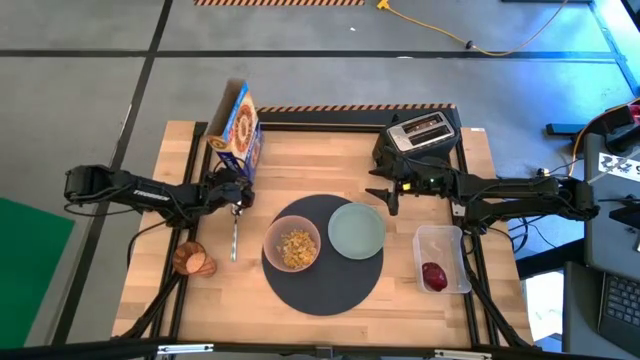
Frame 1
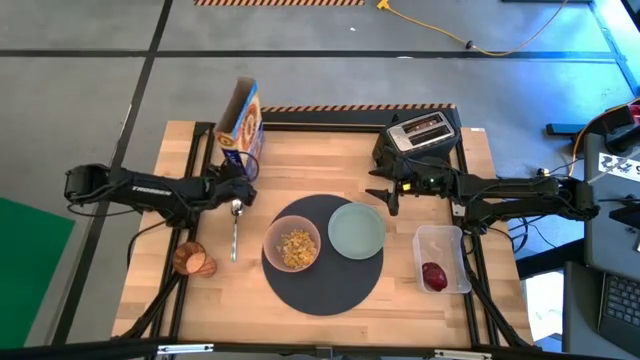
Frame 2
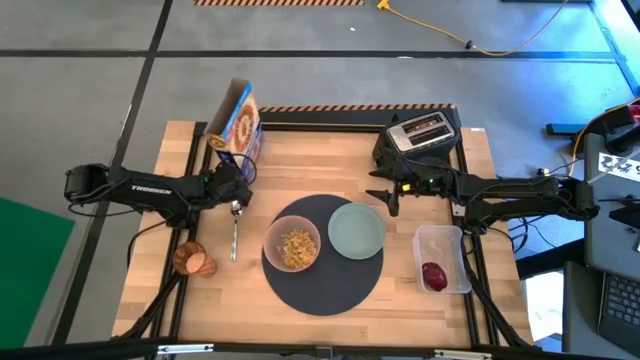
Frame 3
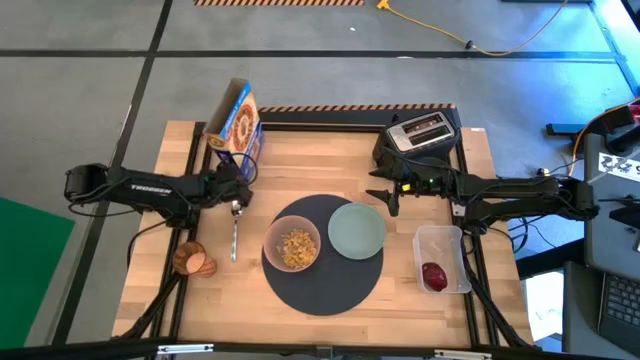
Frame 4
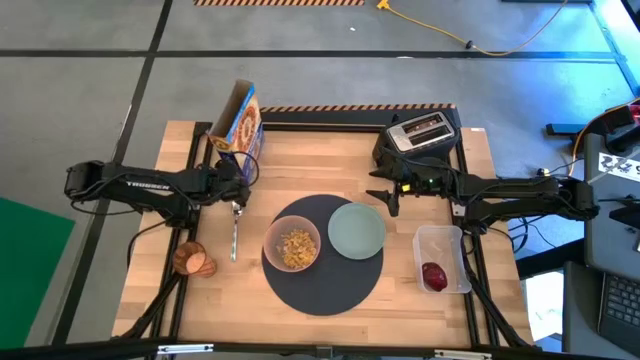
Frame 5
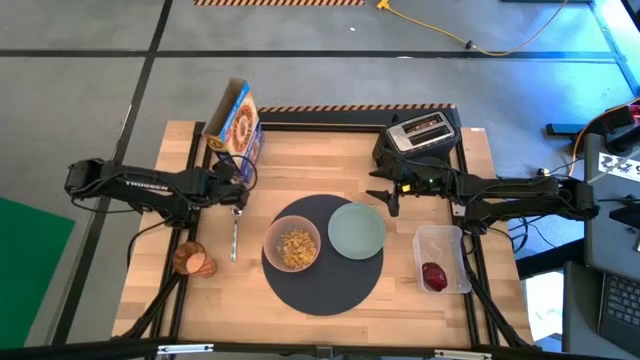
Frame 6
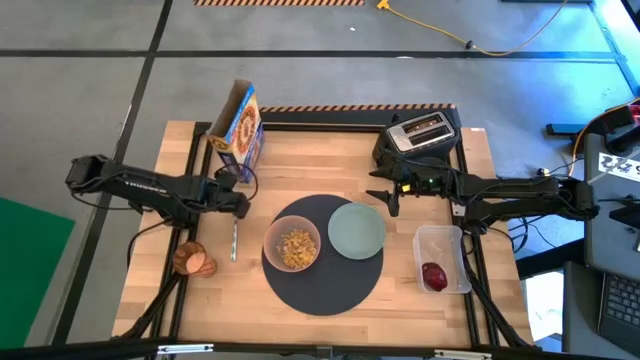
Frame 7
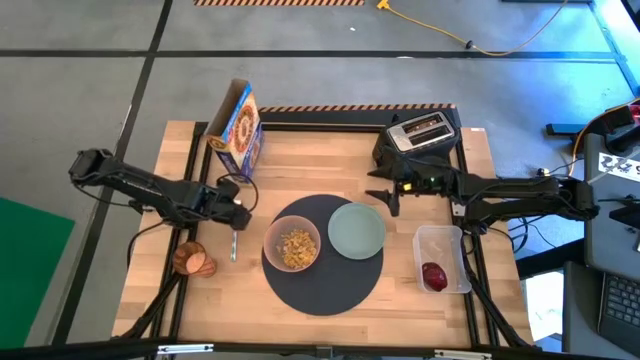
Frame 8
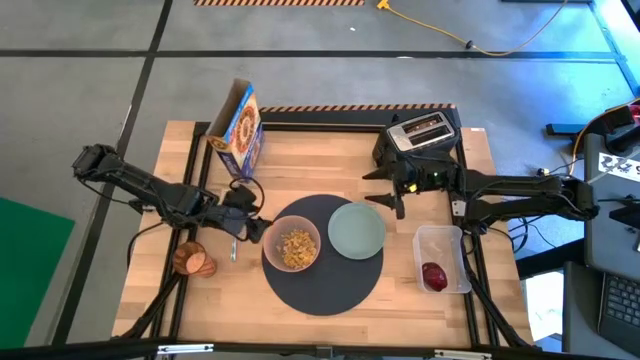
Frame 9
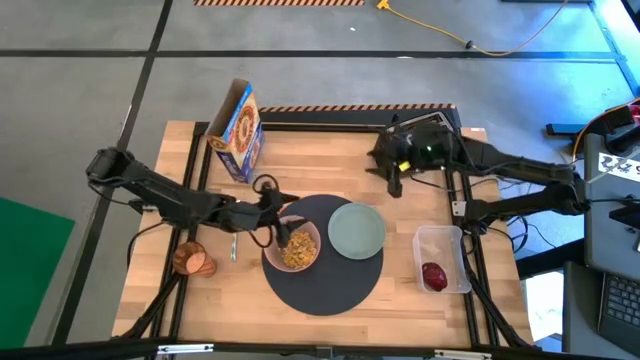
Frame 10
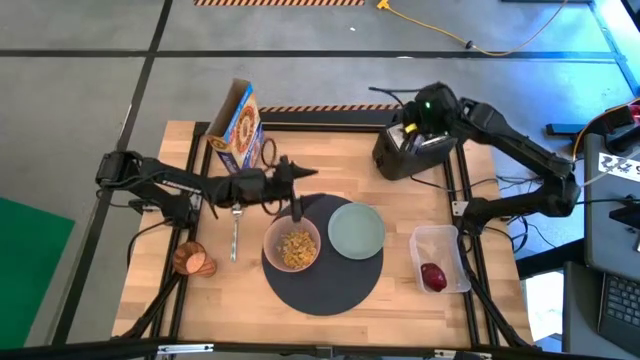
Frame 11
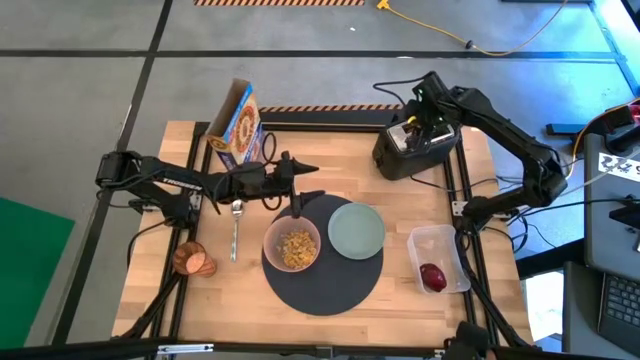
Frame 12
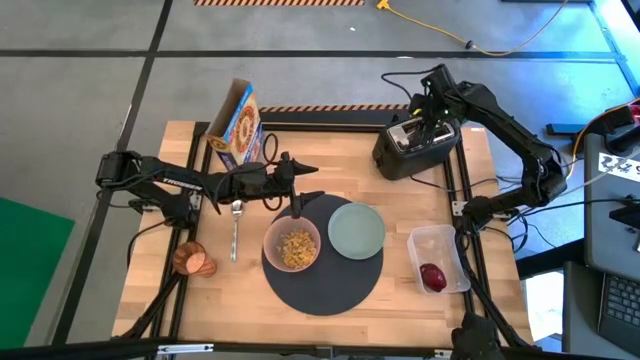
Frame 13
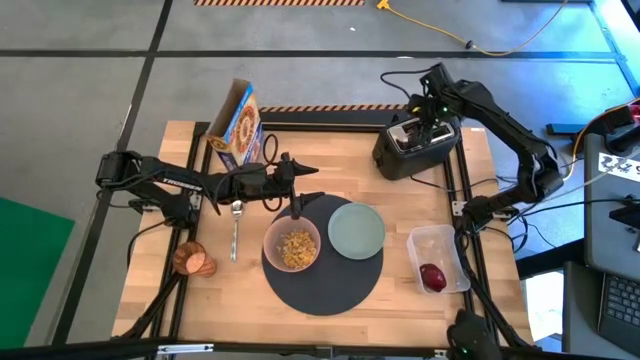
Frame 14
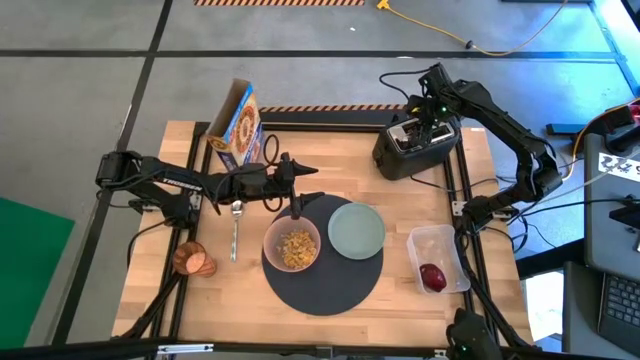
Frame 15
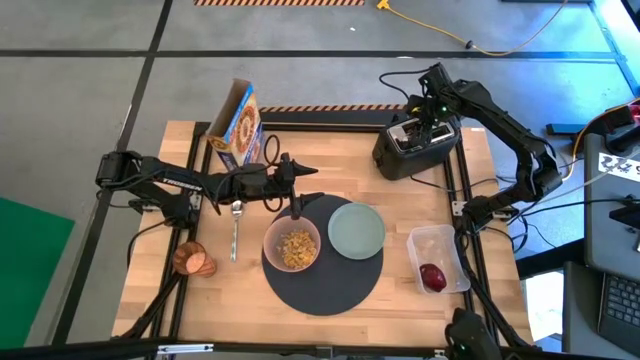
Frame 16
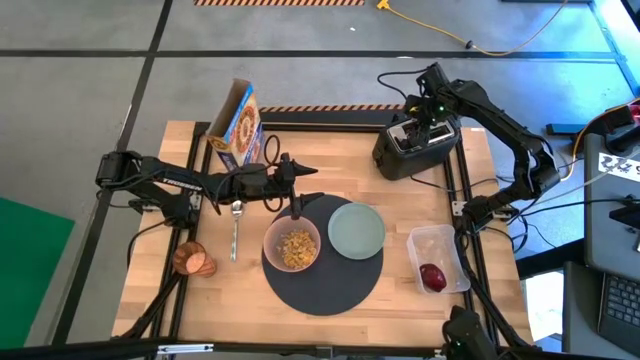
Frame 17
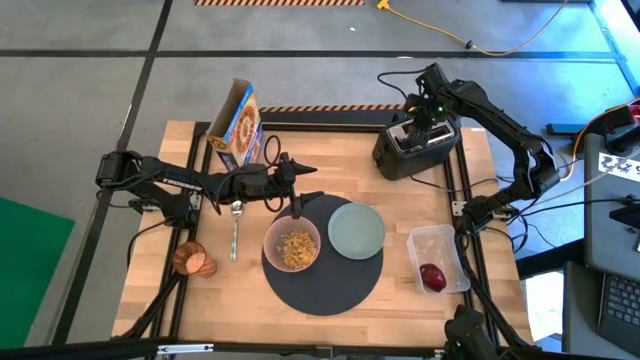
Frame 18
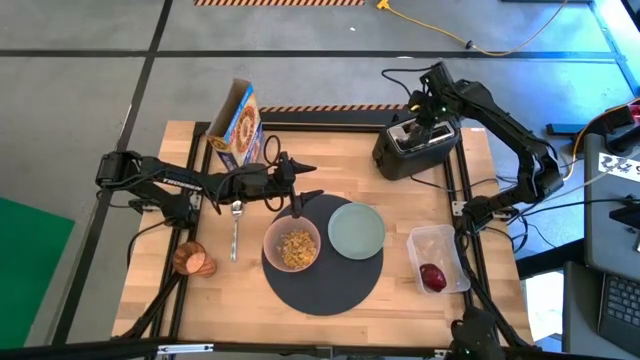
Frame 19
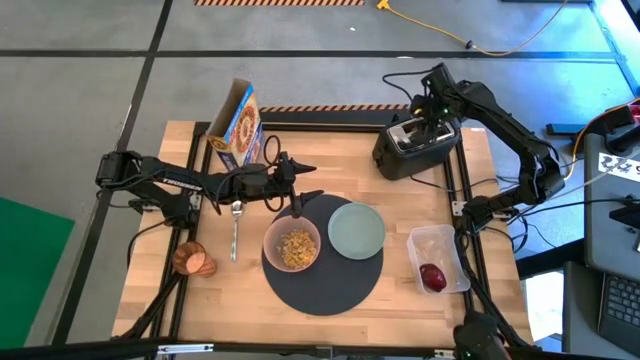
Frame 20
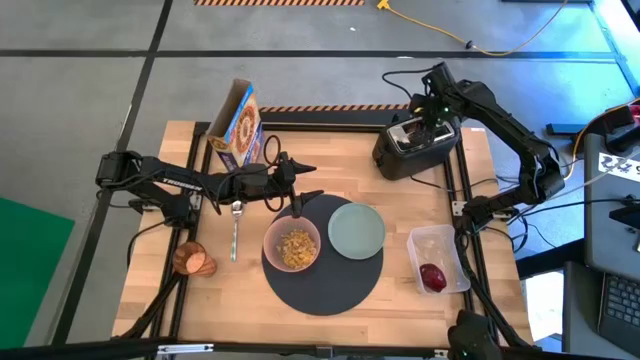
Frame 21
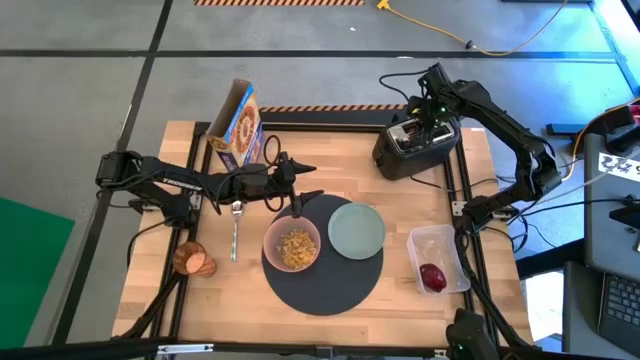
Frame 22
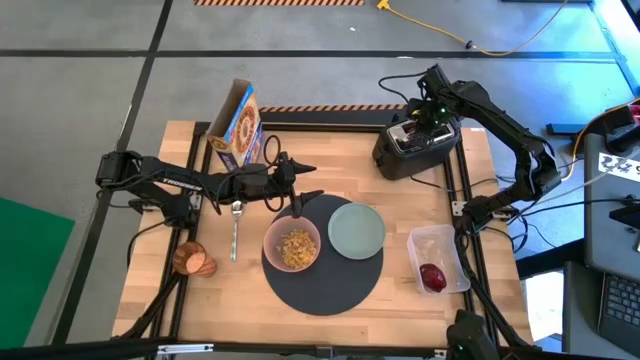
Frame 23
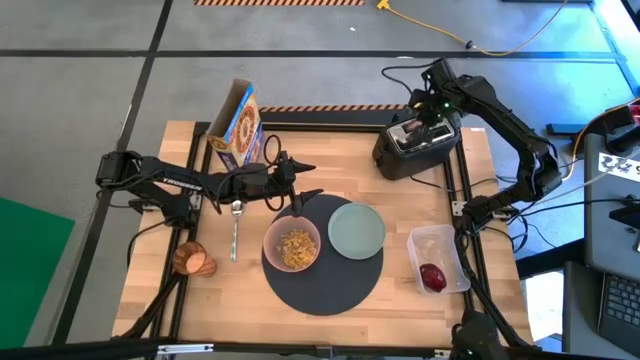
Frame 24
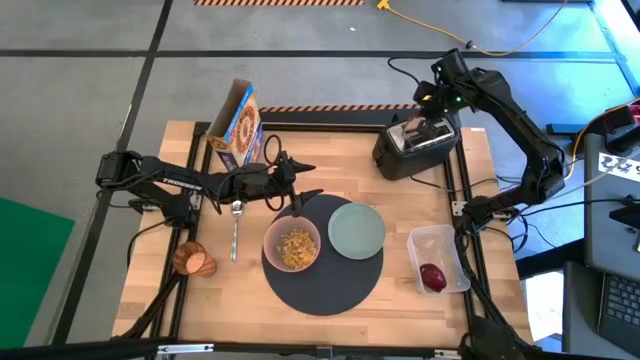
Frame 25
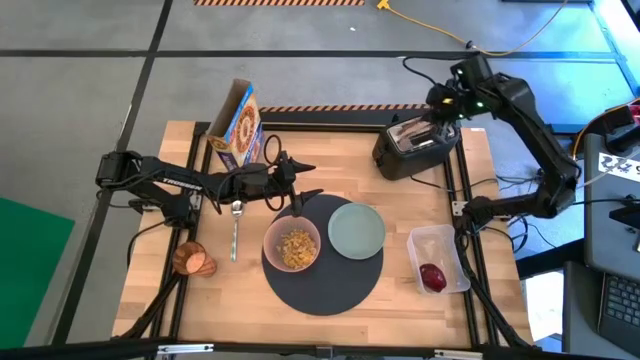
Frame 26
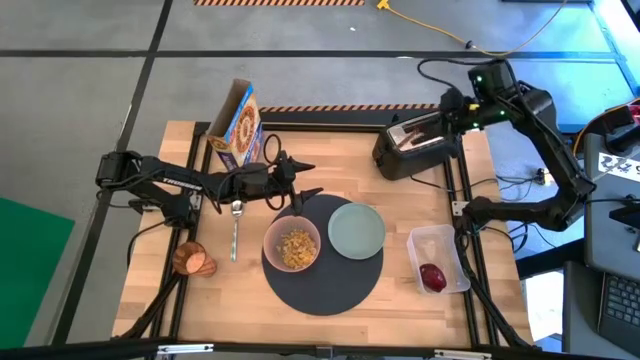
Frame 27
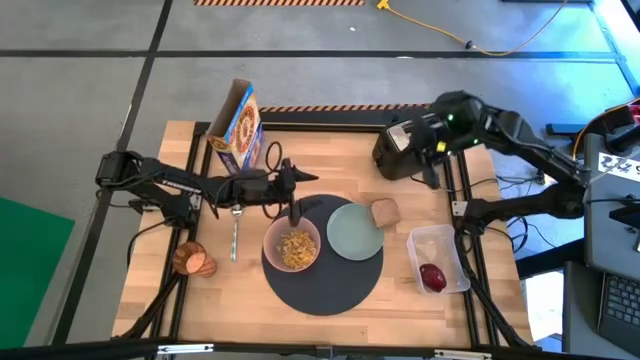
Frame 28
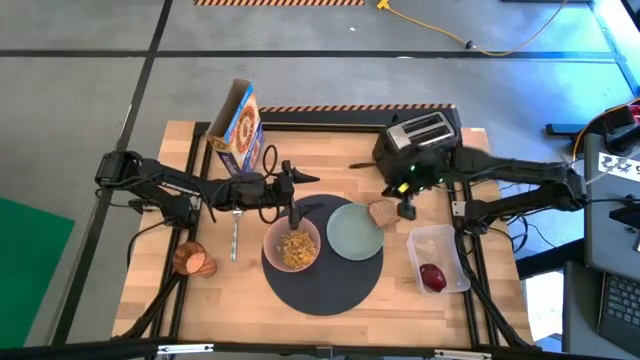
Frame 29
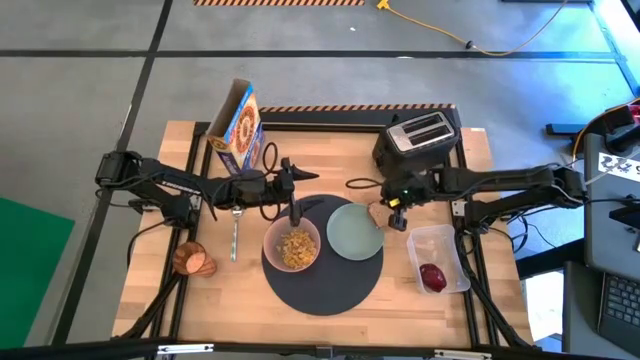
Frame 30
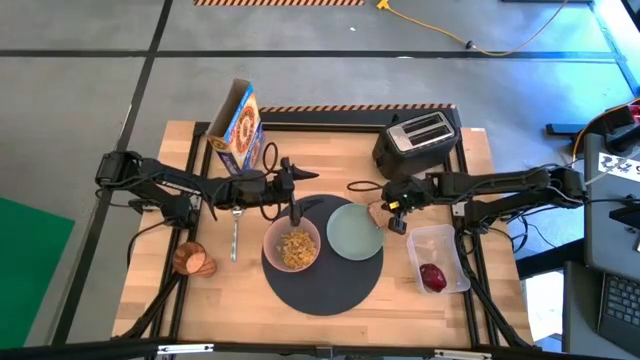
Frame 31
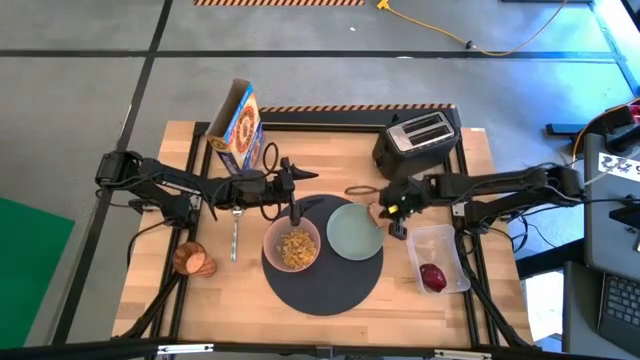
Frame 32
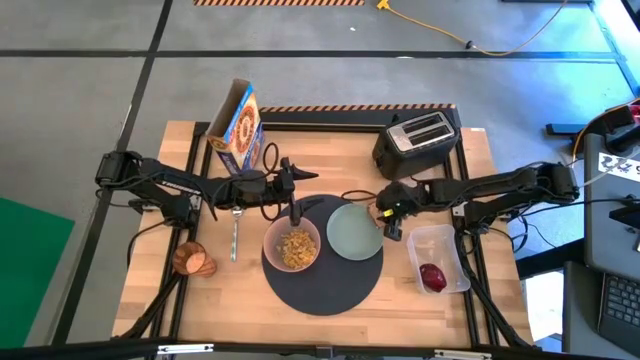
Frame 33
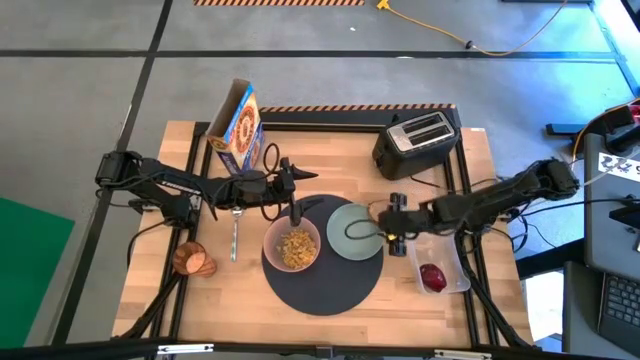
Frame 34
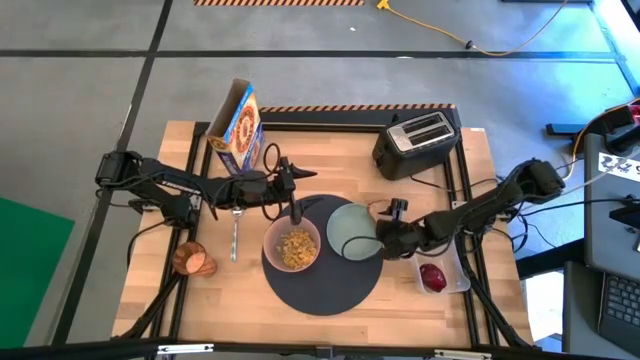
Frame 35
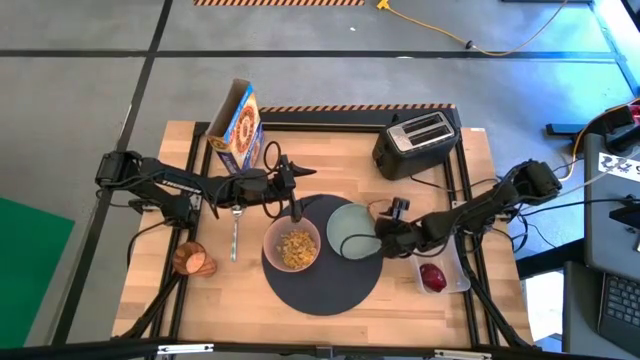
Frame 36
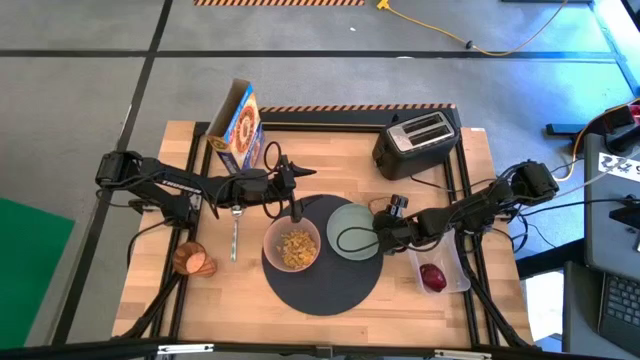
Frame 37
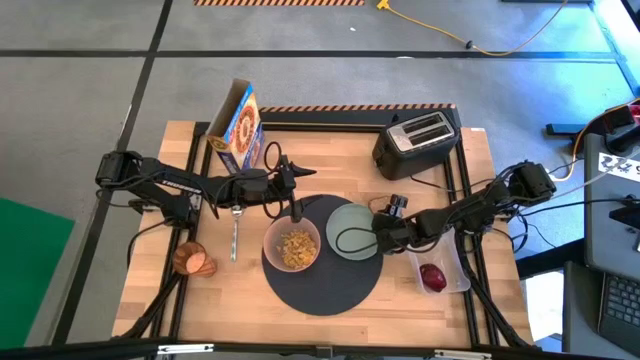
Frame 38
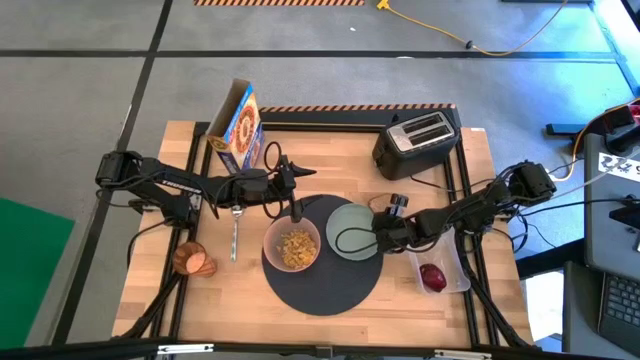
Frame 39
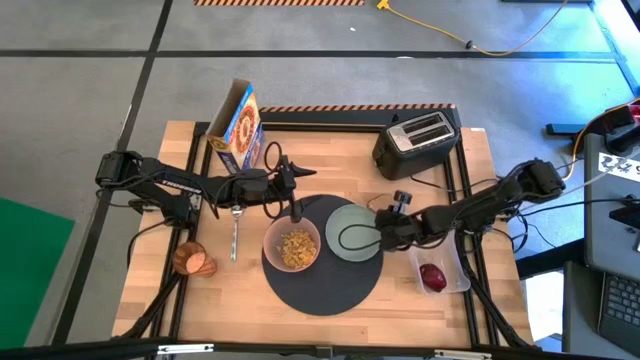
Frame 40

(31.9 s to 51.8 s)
Task: Arrange a breakfast setting
Put the toasted bread from the toaster oven on the green plate

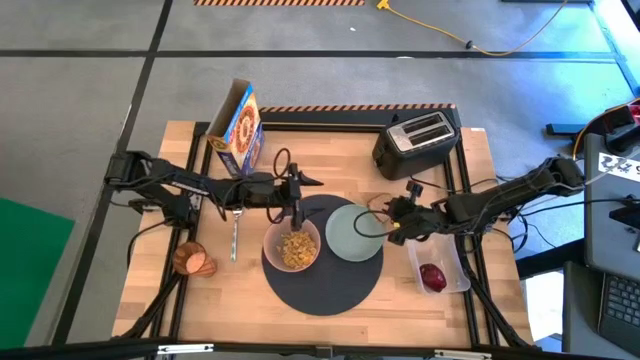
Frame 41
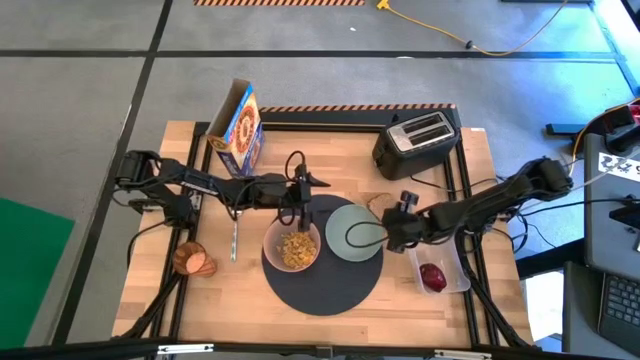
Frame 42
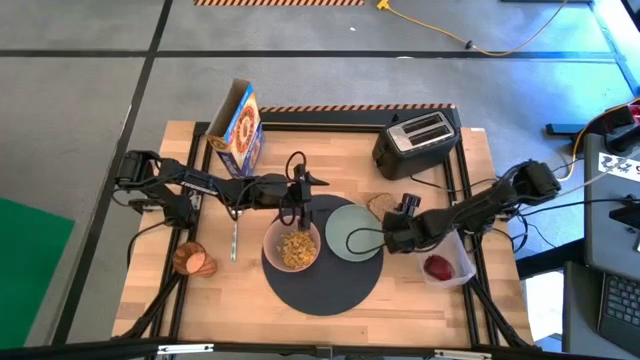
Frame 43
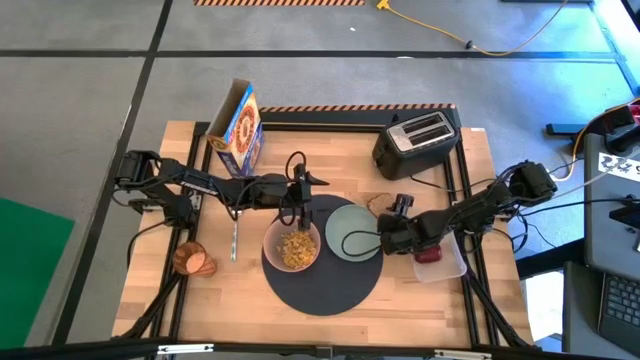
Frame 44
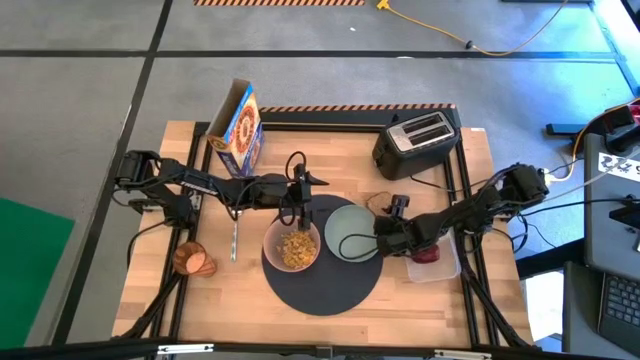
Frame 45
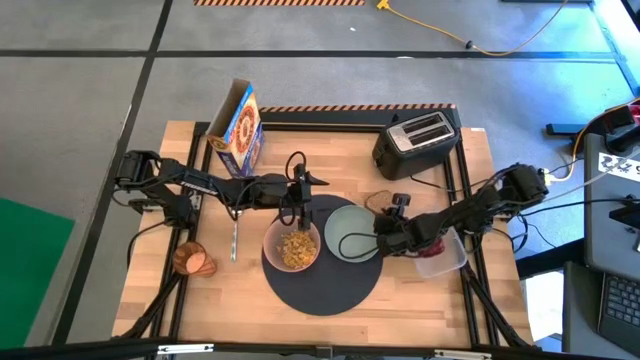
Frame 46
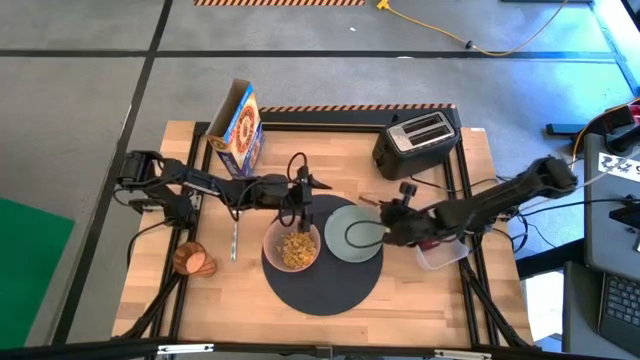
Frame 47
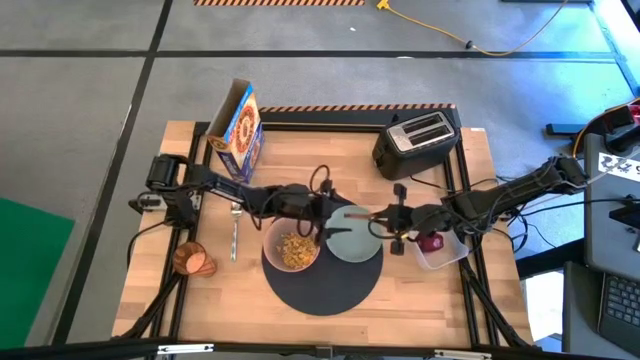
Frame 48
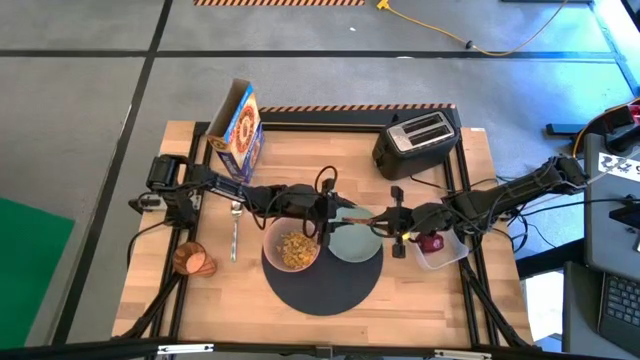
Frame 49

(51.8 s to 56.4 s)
Put the toasted bread from the toaster oven on the green plate
